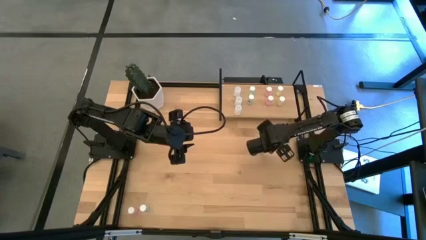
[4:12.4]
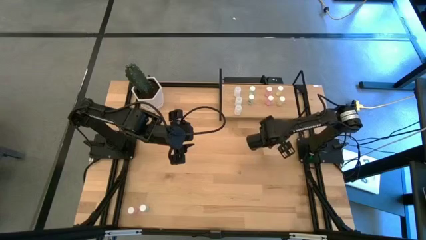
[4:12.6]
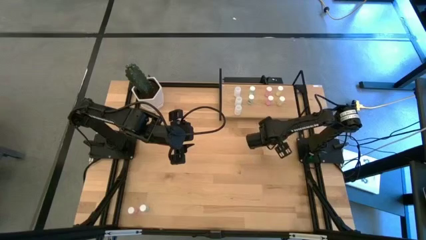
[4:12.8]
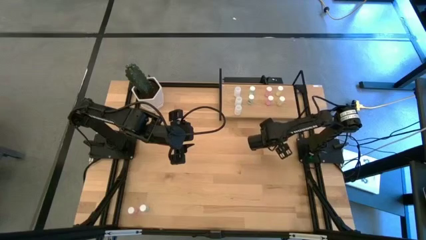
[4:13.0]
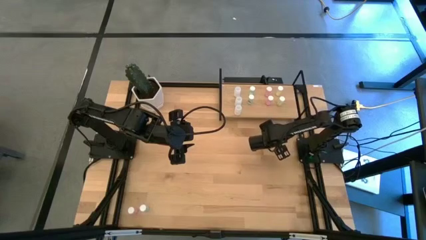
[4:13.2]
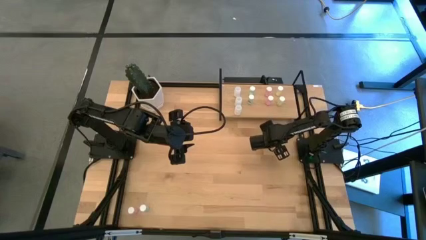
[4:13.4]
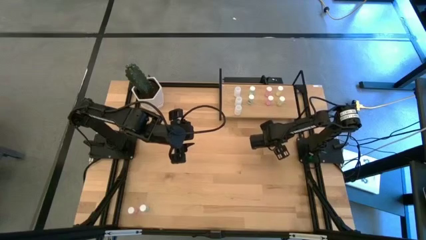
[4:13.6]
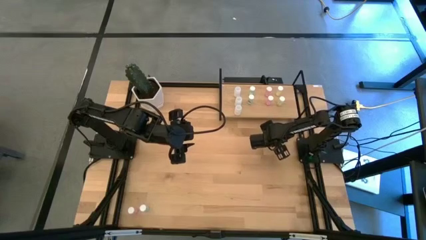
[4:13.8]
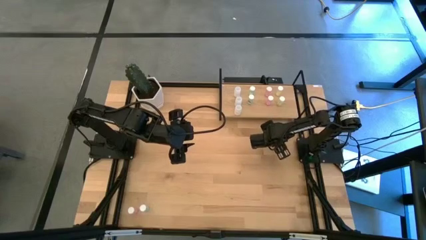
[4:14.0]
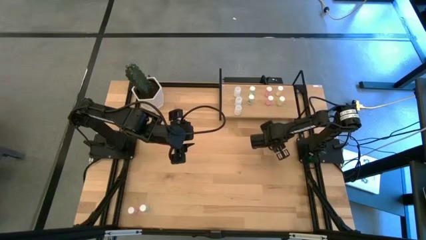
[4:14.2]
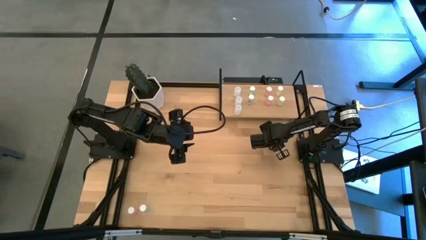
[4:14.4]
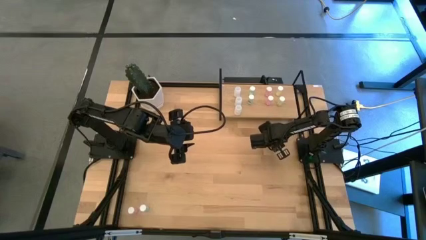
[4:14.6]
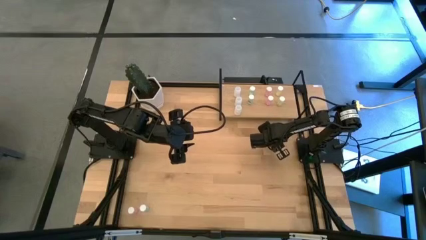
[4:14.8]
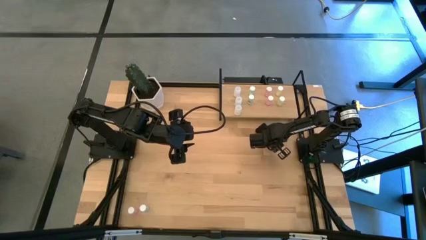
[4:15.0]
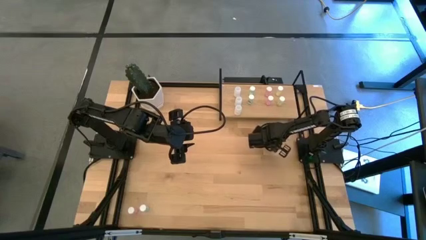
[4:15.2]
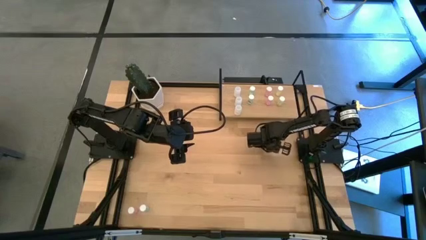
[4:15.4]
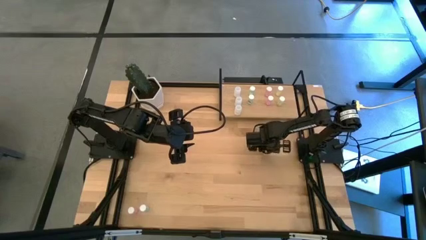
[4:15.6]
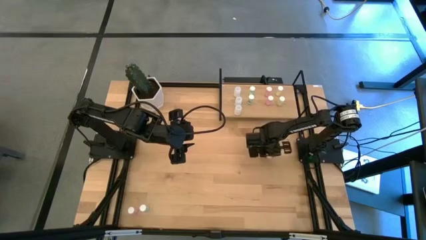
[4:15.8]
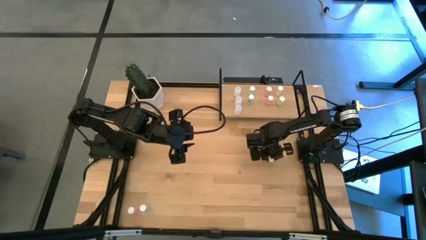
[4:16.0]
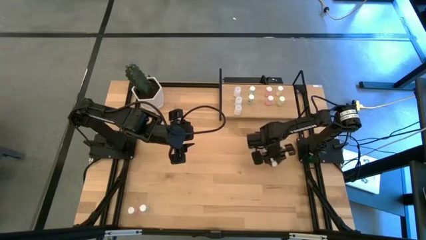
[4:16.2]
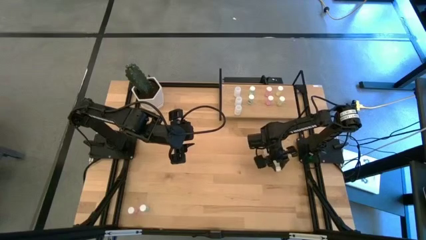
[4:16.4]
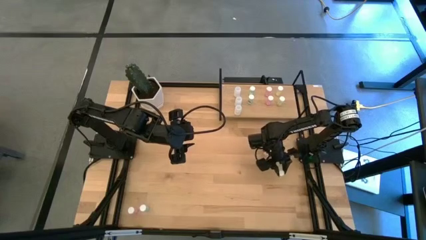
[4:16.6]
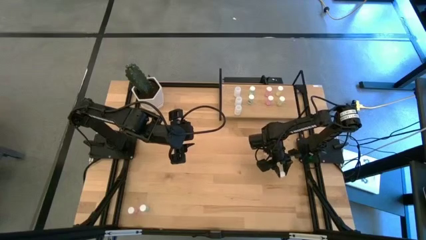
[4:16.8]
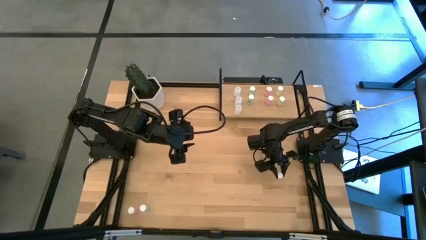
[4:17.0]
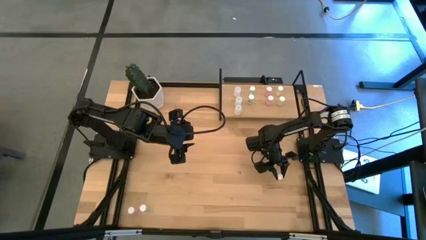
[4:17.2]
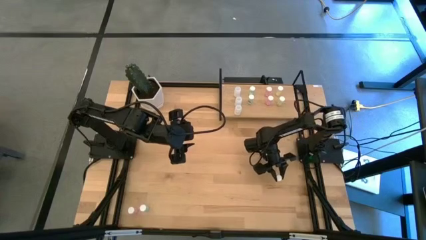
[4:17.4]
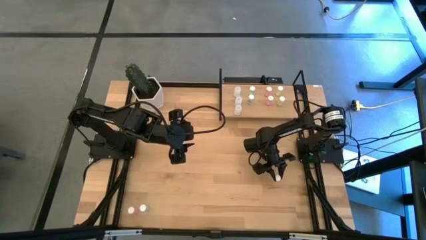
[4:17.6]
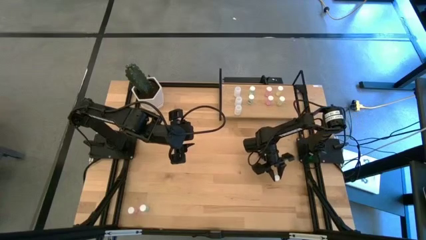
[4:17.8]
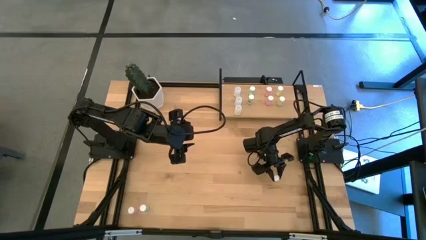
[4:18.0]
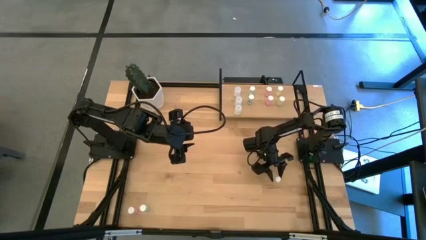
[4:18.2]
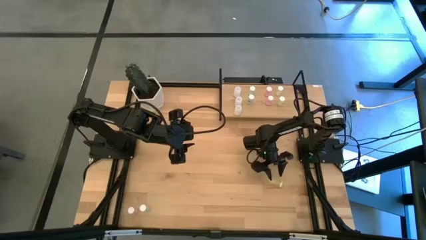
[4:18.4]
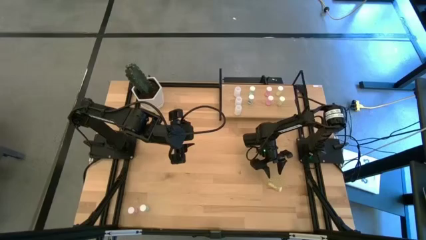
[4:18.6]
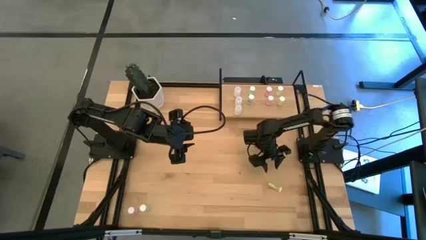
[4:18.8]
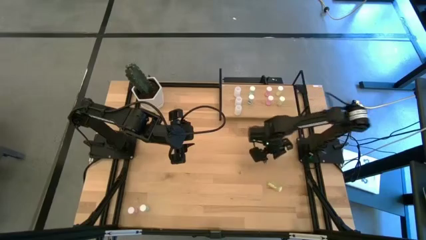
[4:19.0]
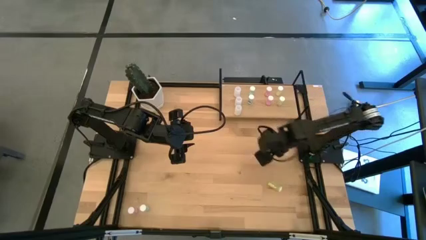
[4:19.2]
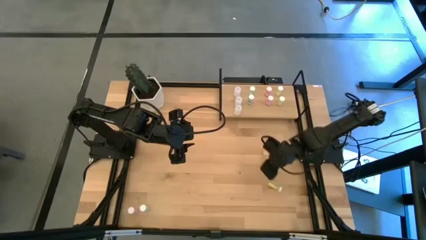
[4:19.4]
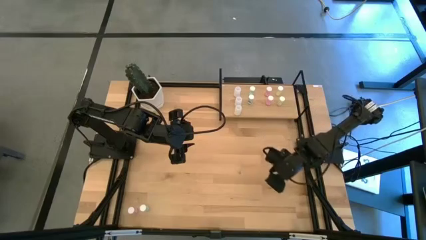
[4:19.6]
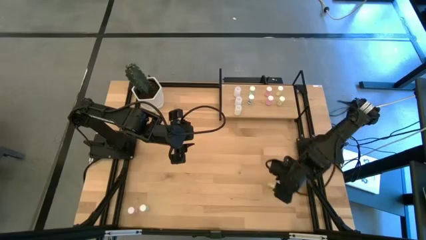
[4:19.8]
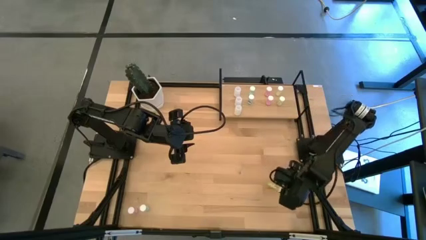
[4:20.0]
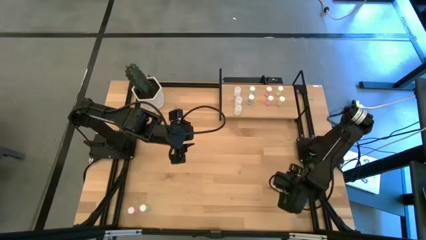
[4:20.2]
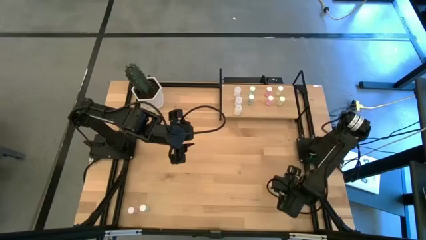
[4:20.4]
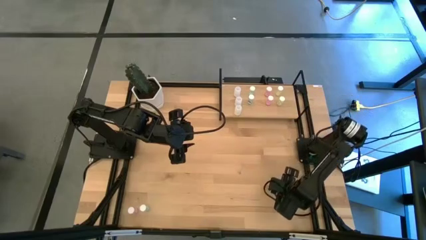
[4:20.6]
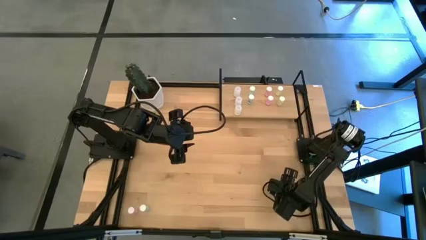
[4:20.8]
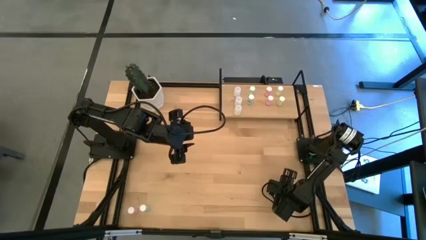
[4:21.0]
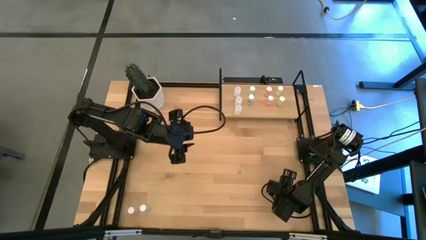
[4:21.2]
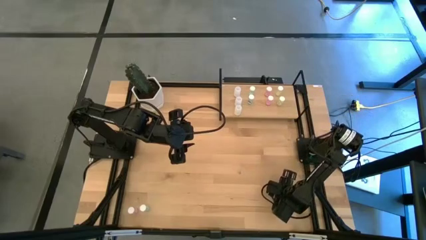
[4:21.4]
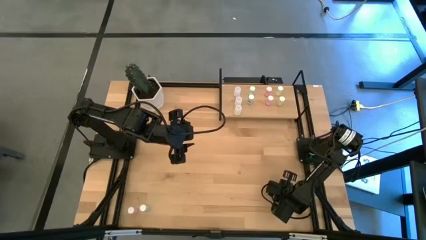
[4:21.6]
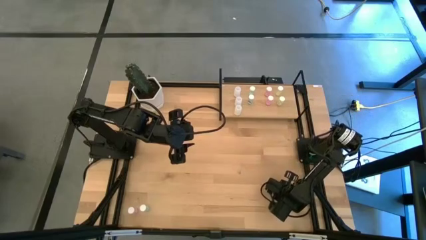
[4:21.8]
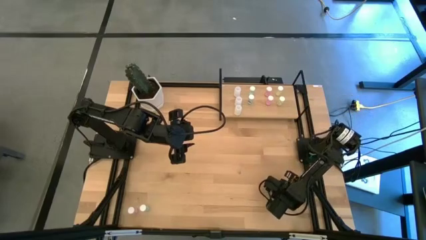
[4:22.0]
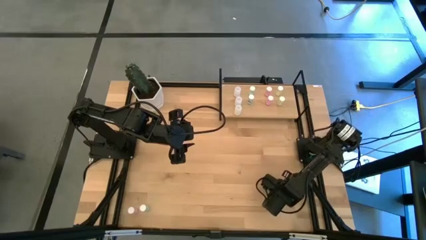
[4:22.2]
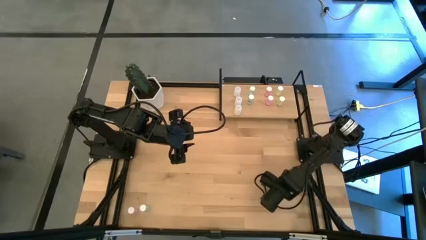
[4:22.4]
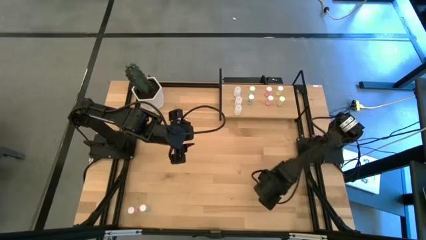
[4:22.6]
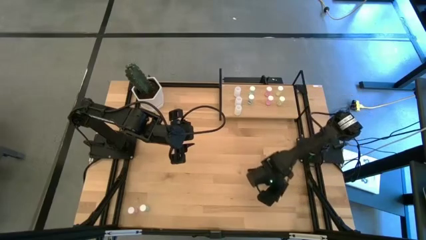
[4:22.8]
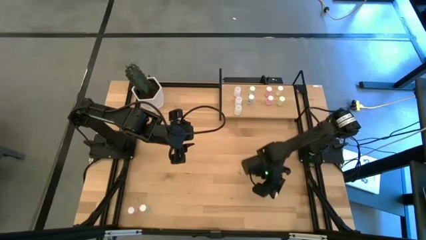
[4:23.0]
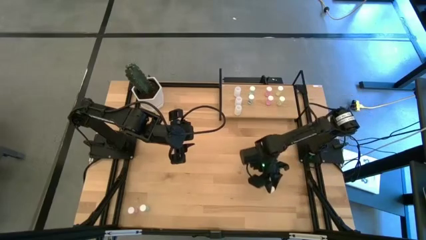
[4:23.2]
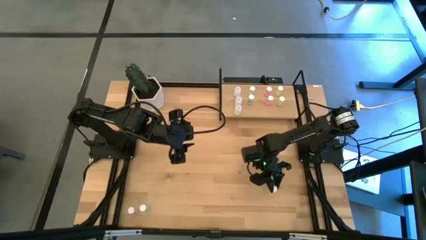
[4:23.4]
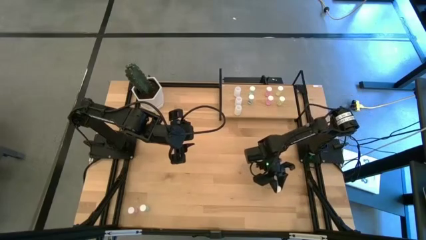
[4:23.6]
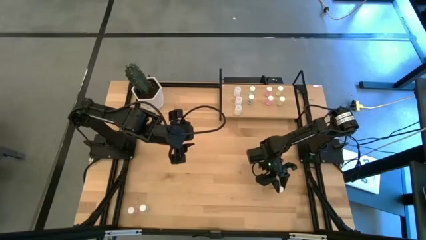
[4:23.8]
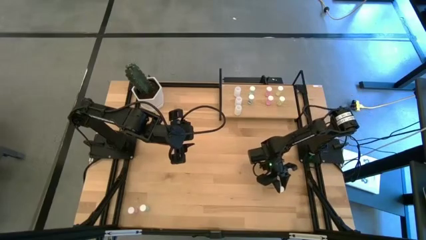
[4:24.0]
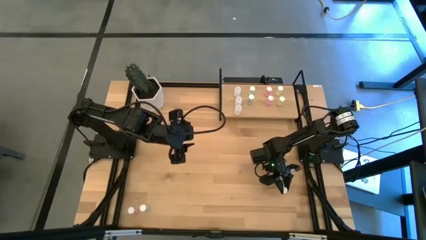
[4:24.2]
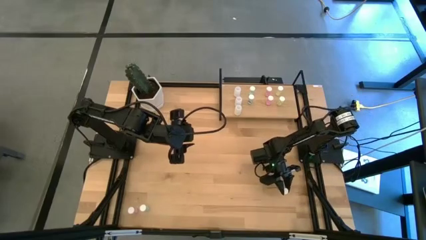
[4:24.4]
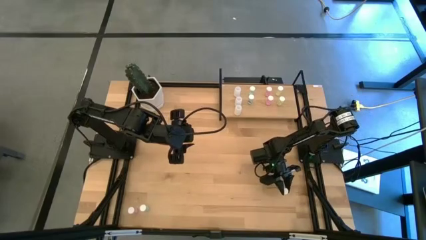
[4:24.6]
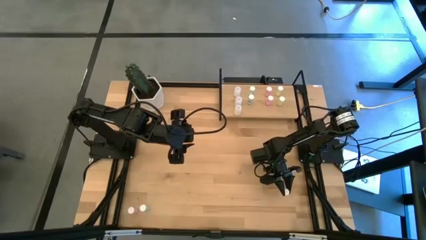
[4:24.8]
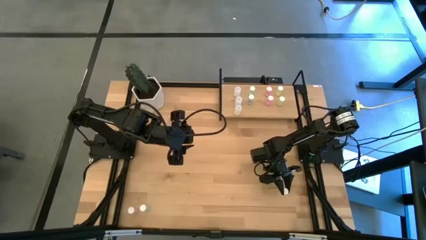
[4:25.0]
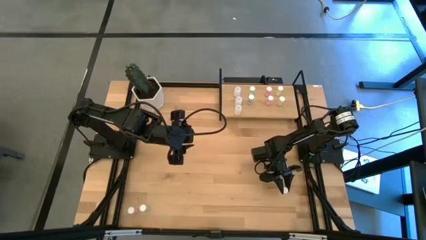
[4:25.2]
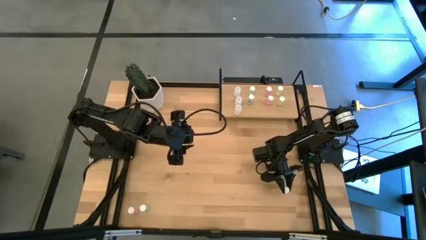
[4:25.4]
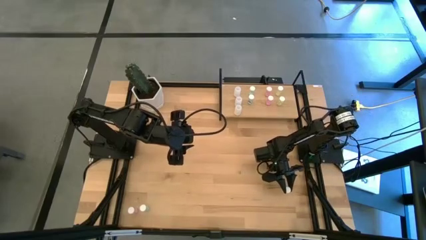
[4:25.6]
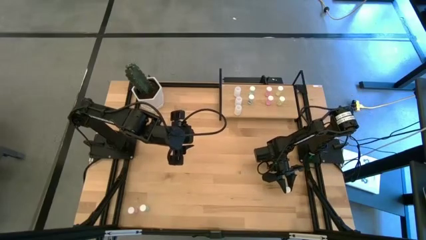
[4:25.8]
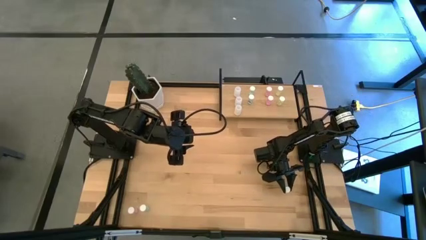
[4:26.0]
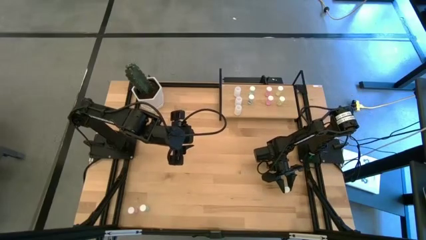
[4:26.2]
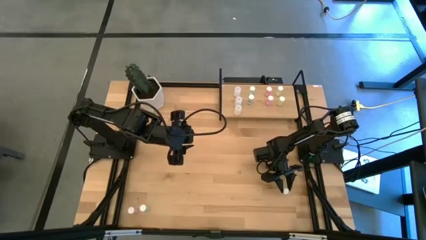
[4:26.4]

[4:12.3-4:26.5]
Task: Pick and place medicine bottles onto shelf by color
Put the yellow pill bottle on the shelf aligned with the other yellow pill bottles

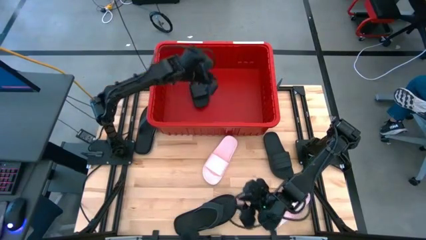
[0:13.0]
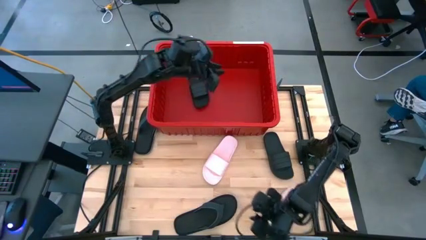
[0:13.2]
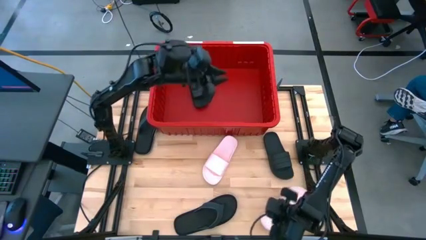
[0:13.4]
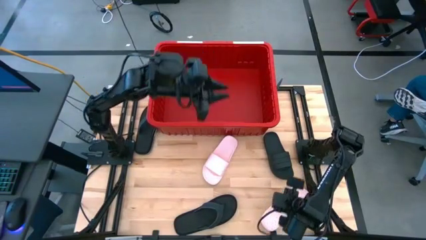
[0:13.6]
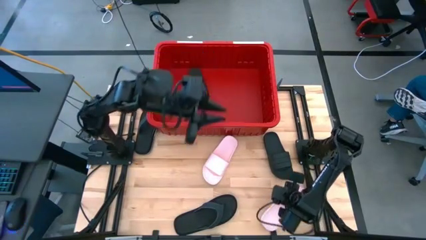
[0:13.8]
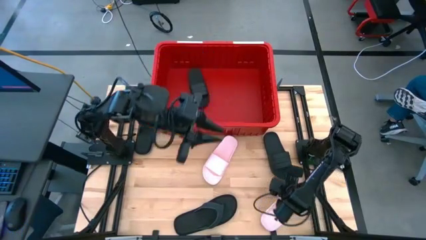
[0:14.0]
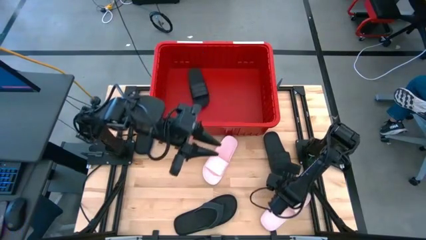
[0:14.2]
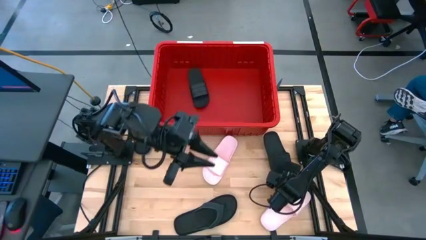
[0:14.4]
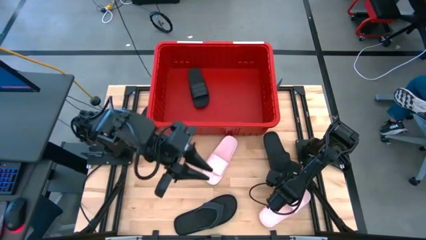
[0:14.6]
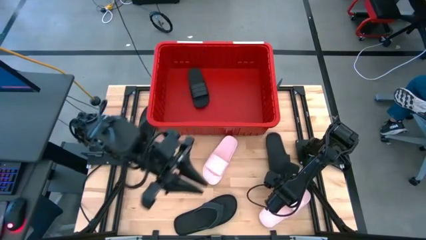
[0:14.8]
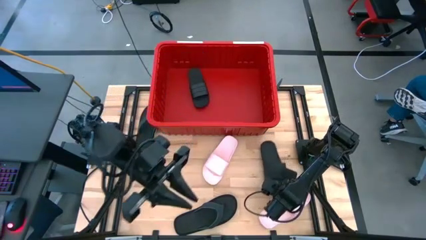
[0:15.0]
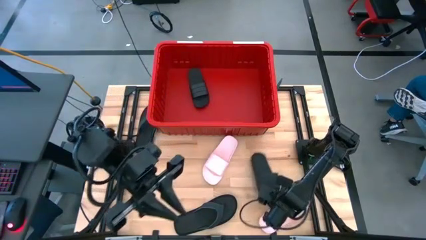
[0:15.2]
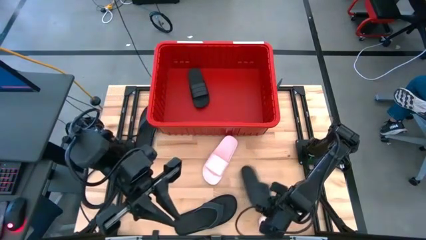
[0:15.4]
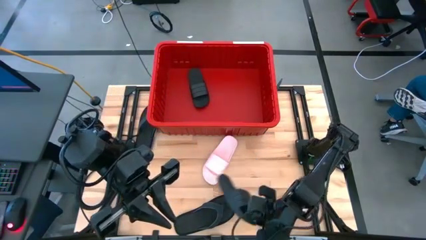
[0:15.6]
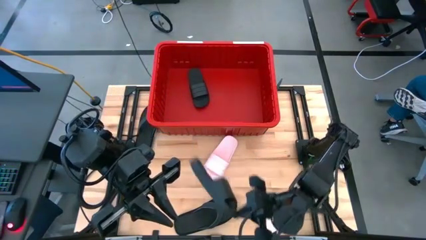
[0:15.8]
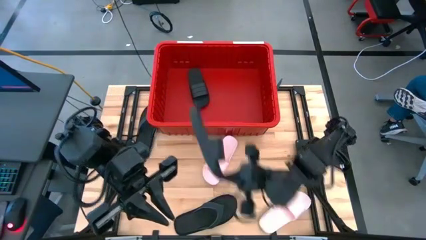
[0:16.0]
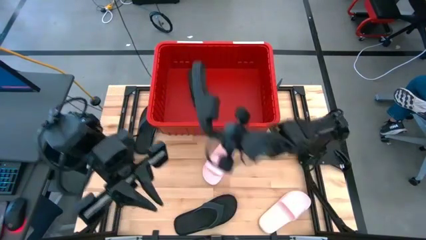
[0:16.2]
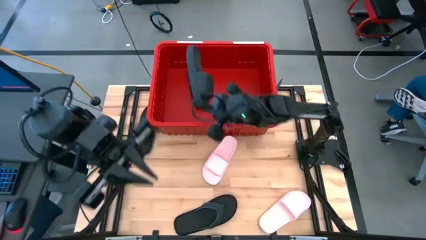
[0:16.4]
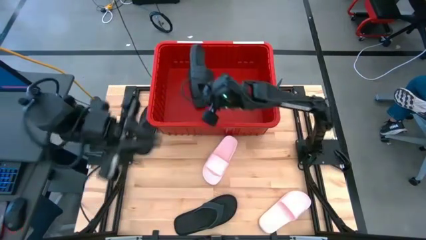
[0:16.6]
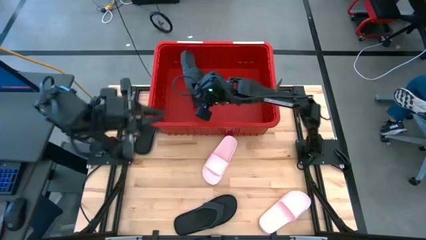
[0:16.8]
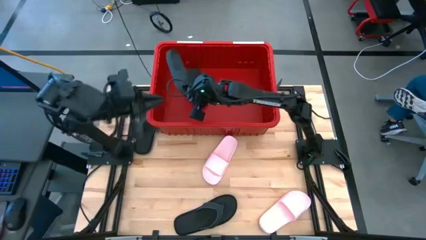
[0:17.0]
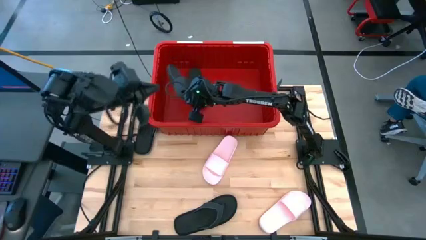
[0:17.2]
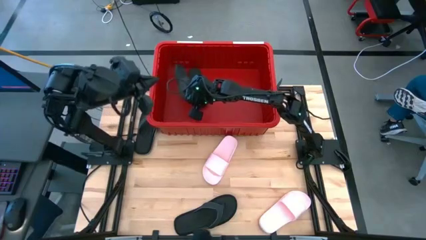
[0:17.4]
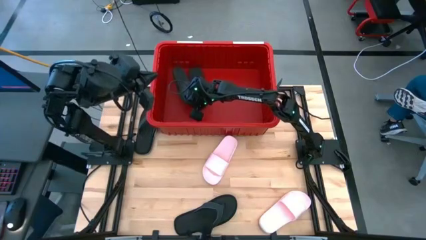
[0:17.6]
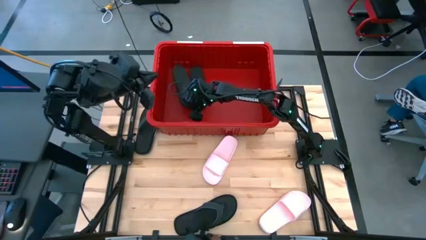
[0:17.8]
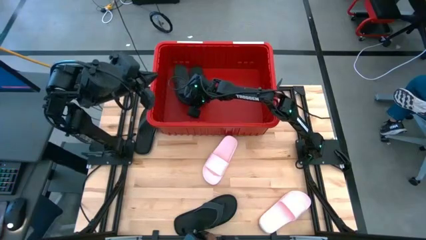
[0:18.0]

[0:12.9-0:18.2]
Task: Pick and place slides into bin
Put the black slide in the red bin
